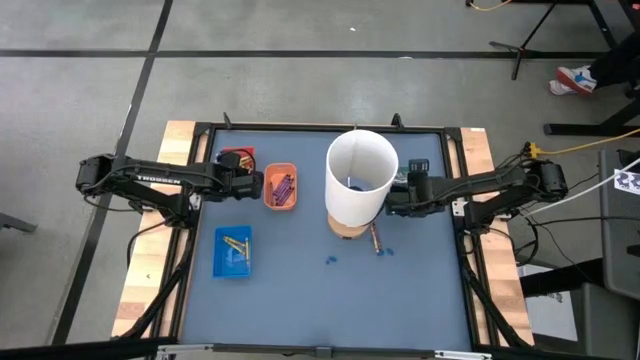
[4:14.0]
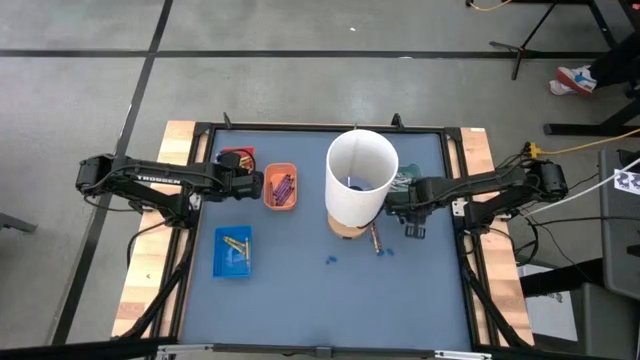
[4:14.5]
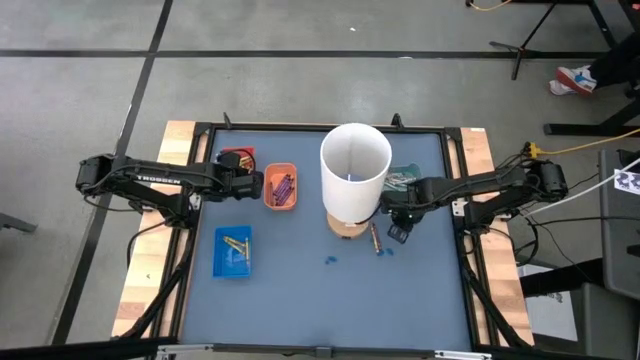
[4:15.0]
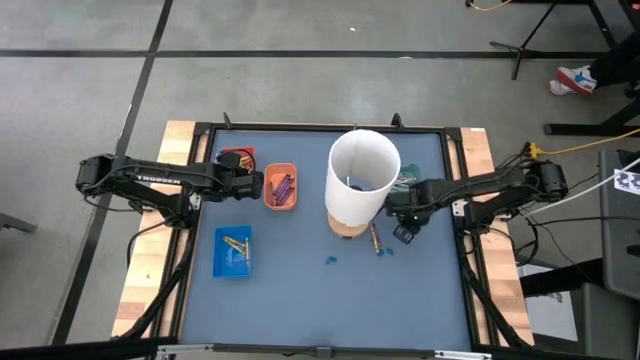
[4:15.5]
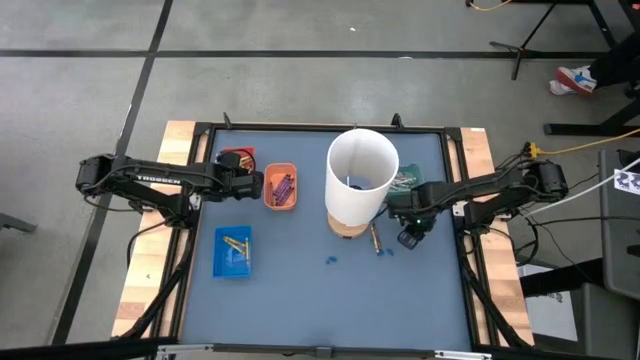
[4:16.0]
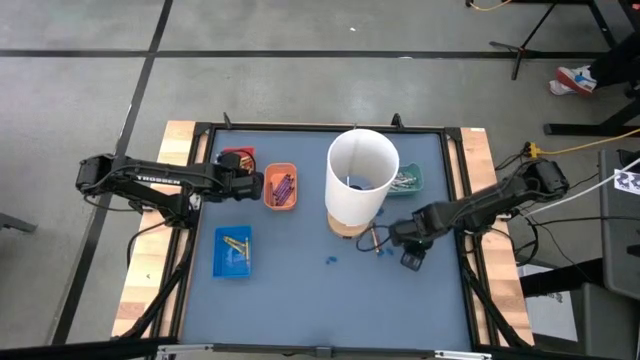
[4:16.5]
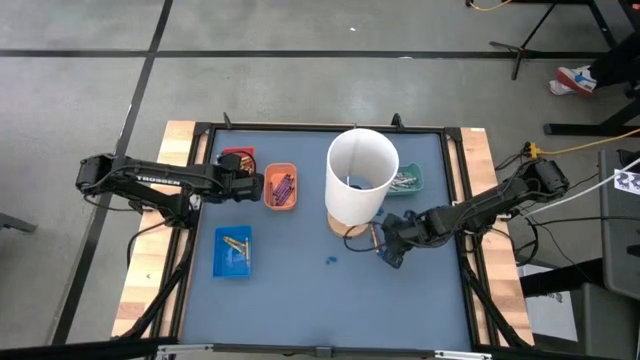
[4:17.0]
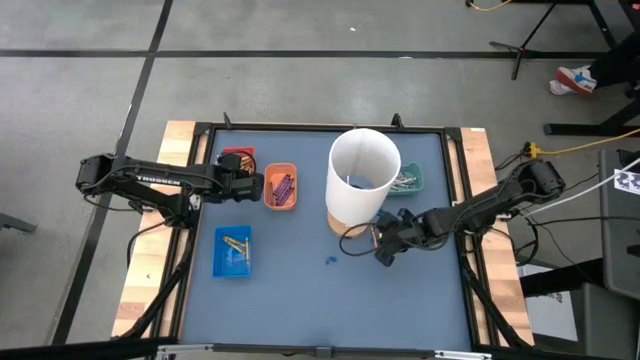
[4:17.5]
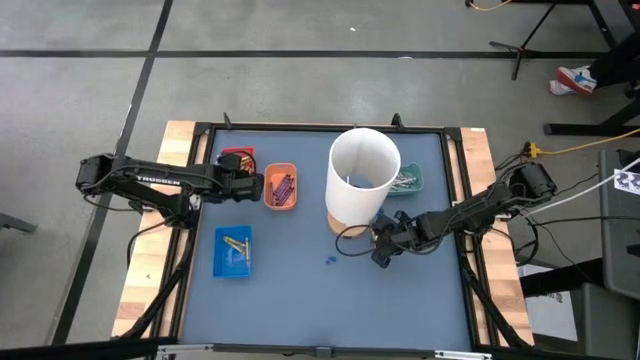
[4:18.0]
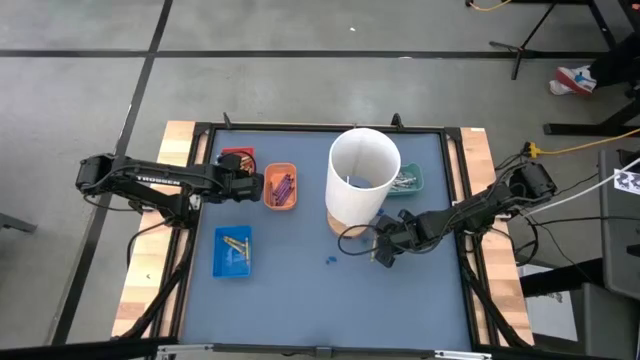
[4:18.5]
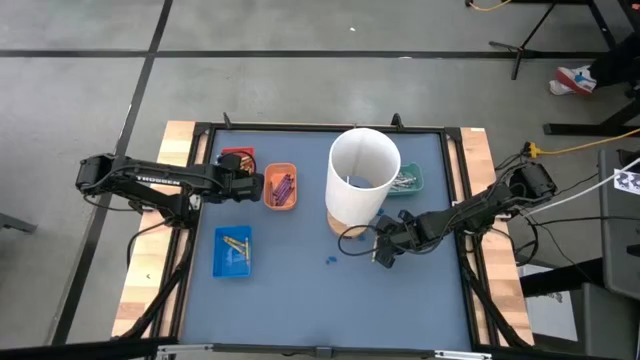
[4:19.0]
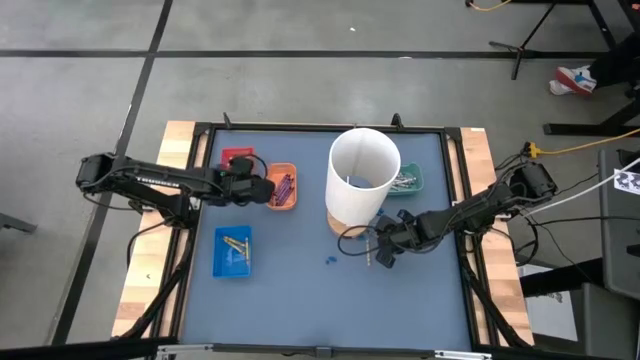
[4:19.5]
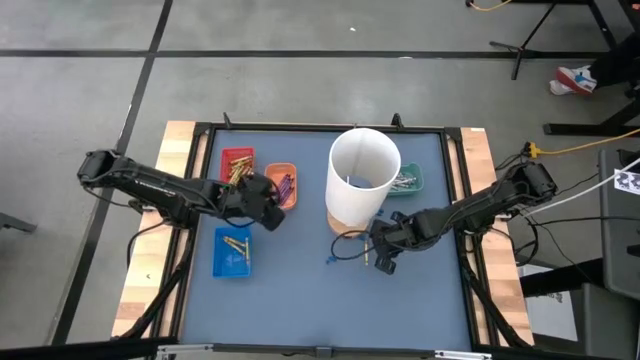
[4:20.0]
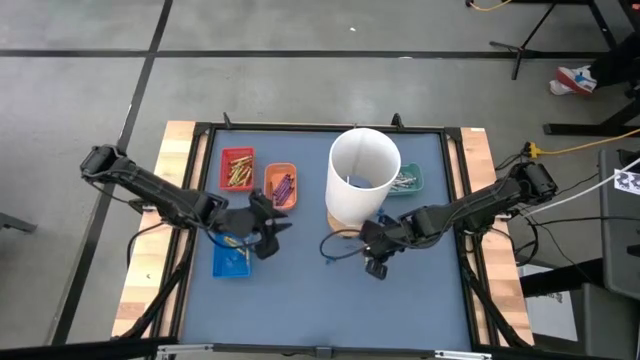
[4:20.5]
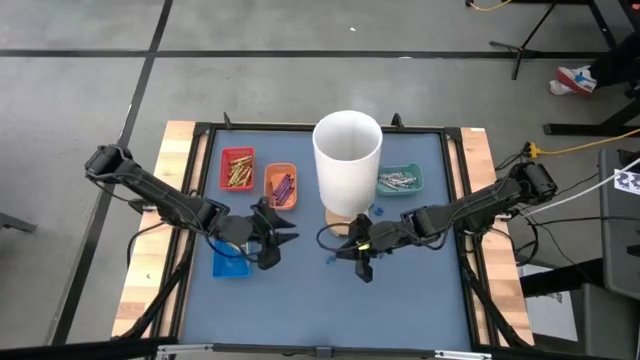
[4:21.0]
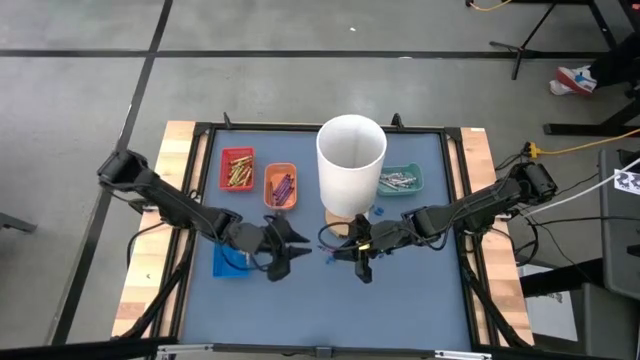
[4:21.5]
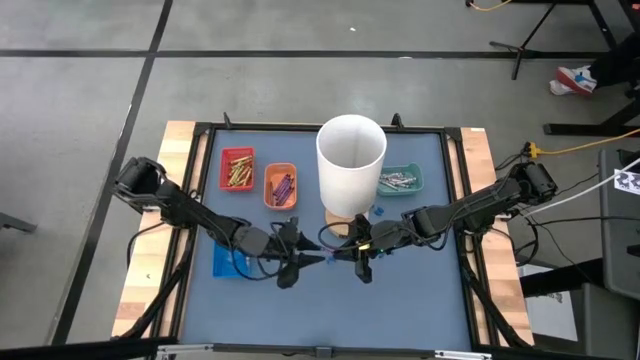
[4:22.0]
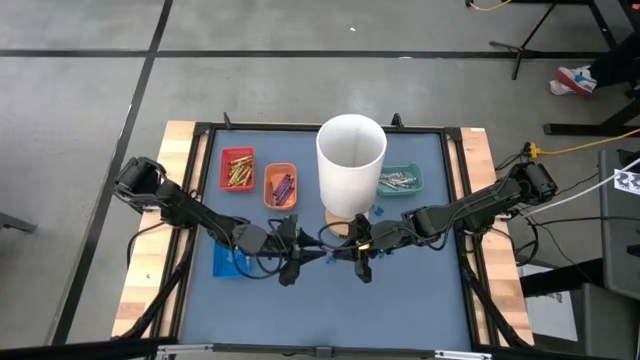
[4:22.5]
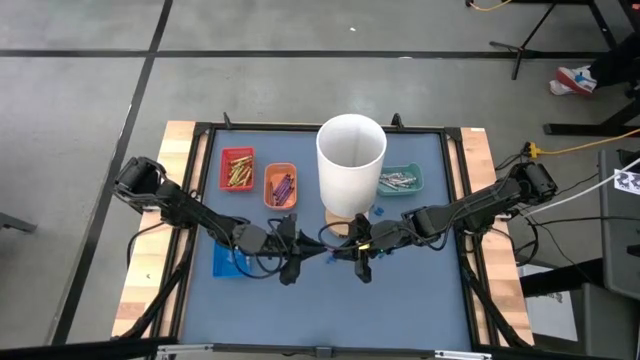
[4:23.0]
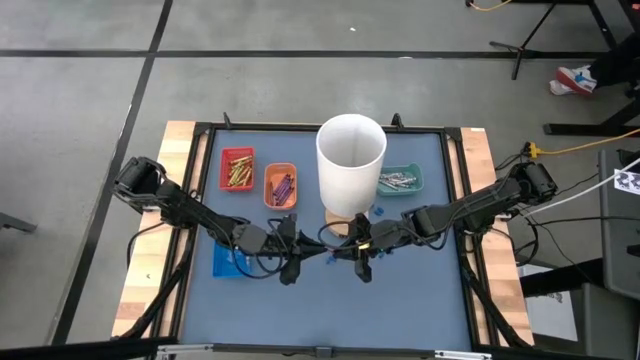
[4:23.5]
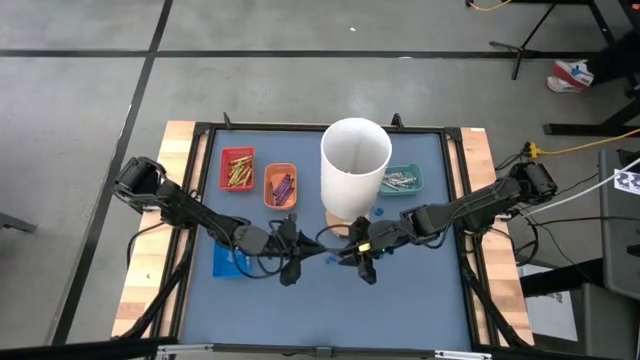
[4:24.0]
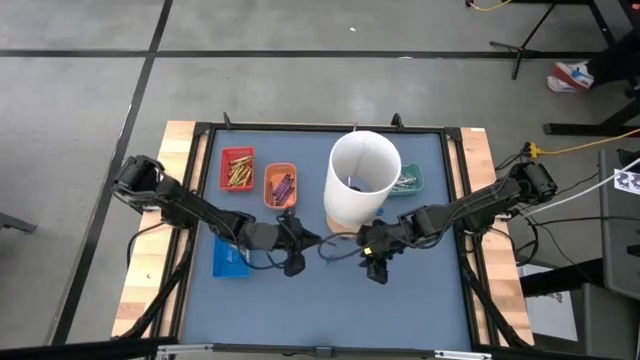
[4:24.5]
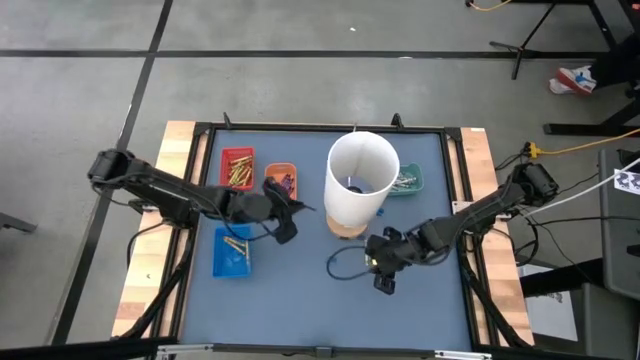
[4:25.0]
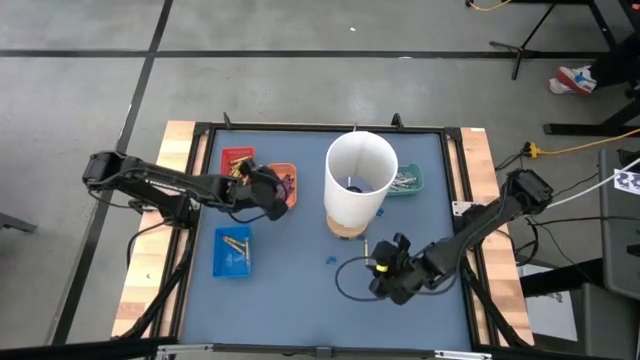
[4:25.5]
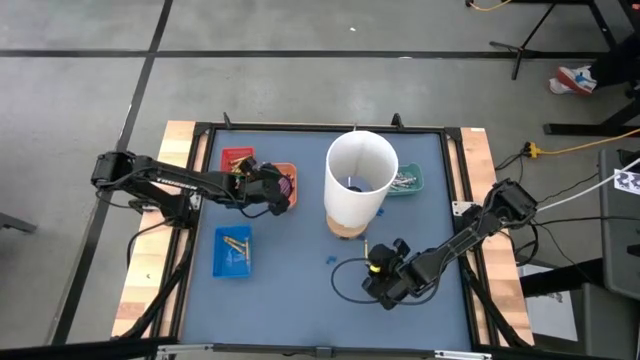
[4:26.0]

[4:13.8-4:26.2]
Task: Sort crayons
Put the violet crayon into the orange bin

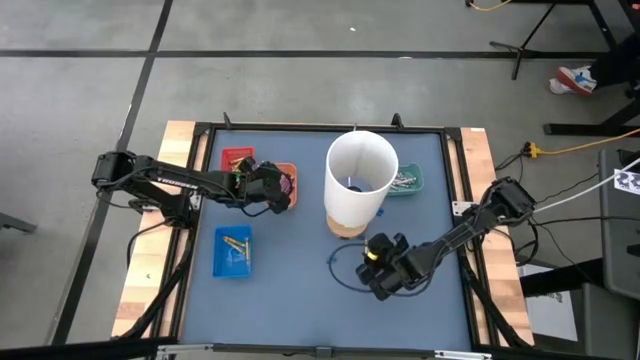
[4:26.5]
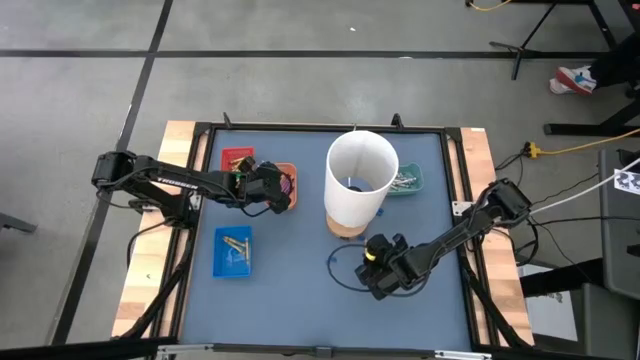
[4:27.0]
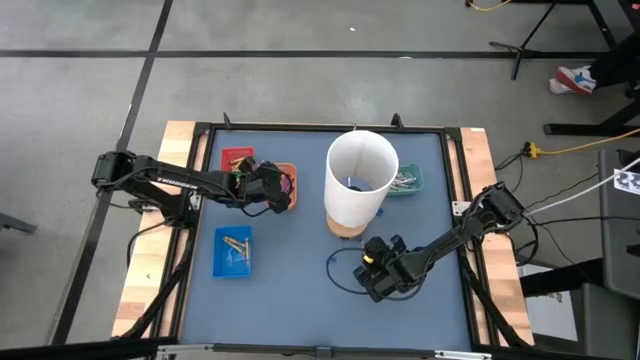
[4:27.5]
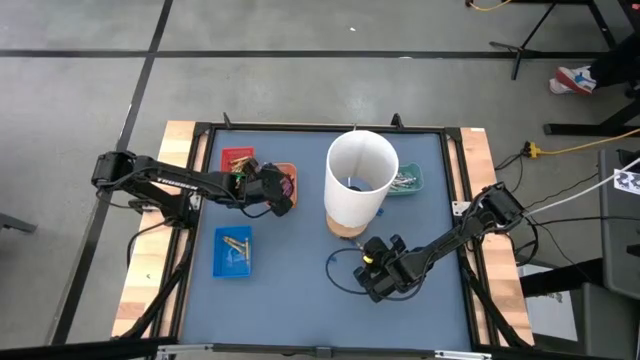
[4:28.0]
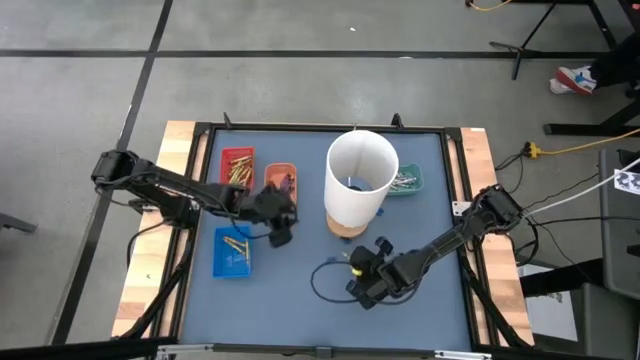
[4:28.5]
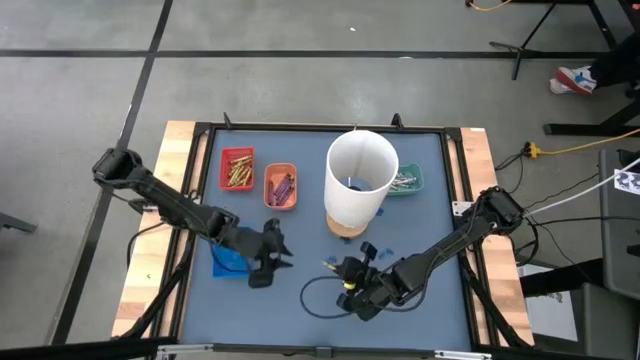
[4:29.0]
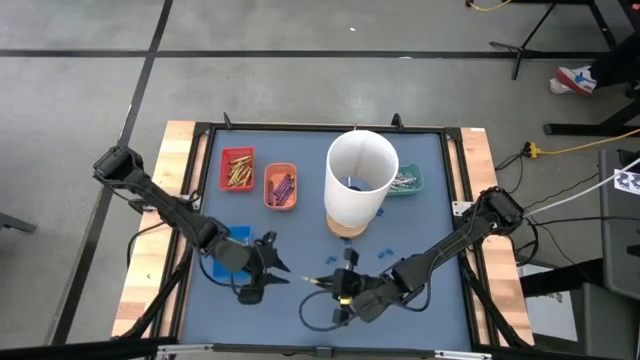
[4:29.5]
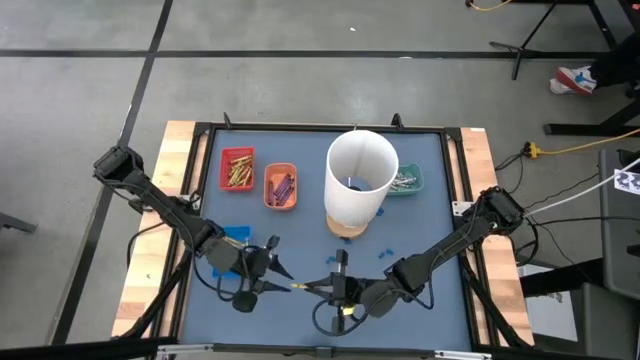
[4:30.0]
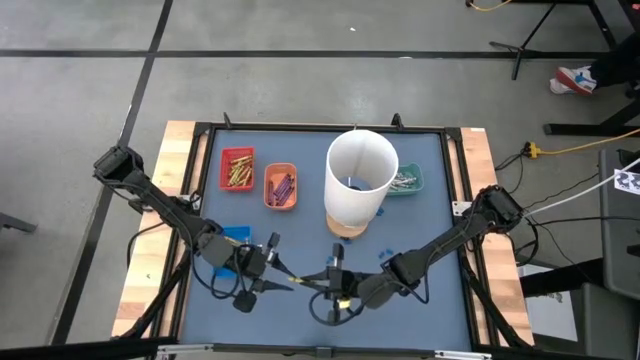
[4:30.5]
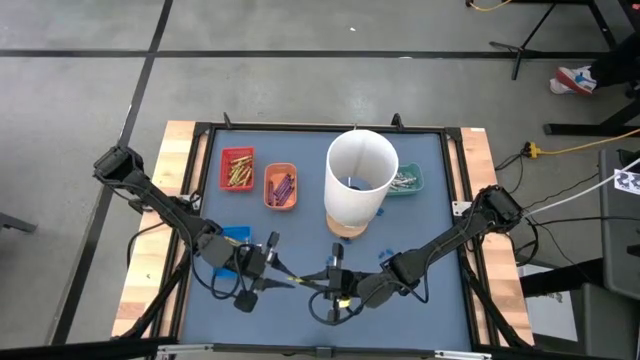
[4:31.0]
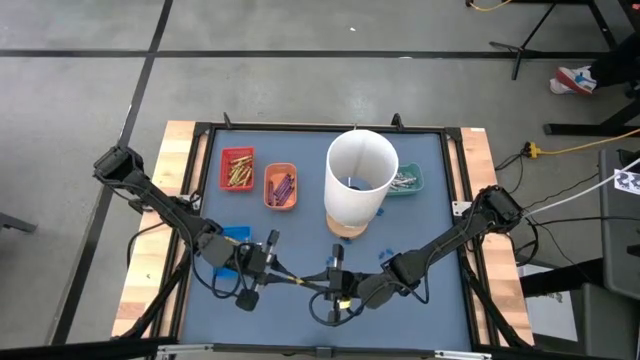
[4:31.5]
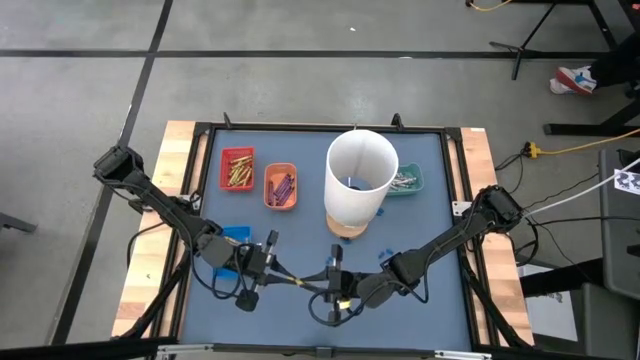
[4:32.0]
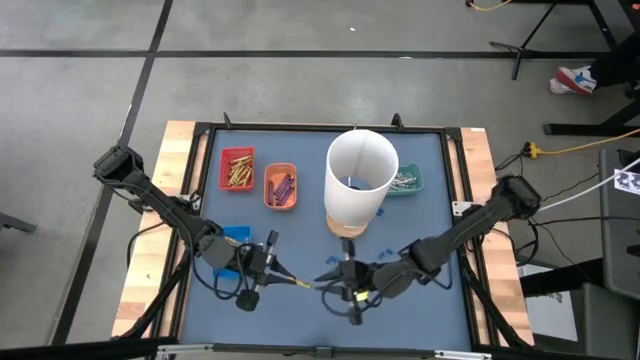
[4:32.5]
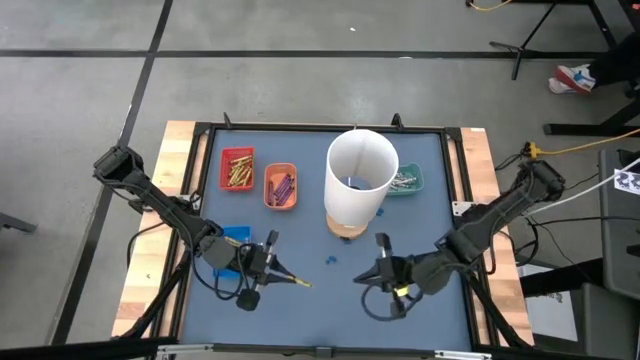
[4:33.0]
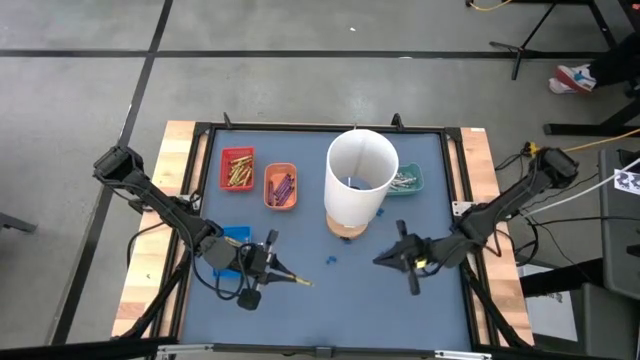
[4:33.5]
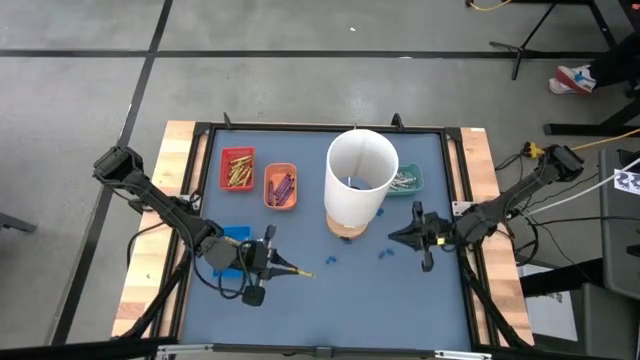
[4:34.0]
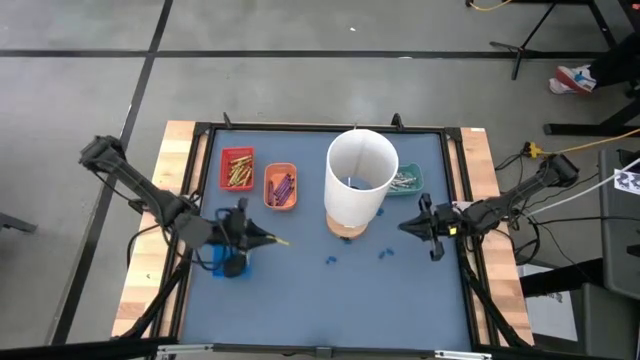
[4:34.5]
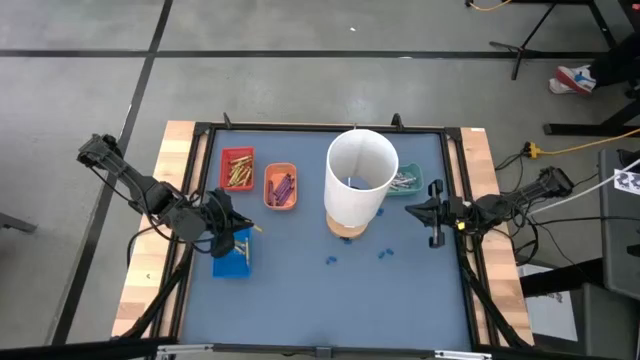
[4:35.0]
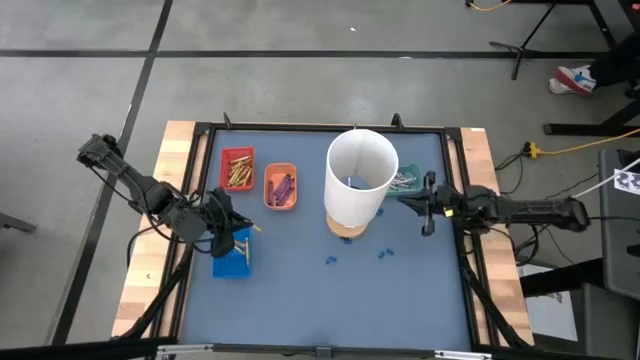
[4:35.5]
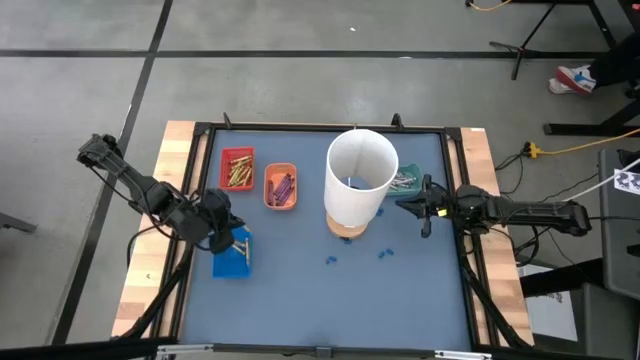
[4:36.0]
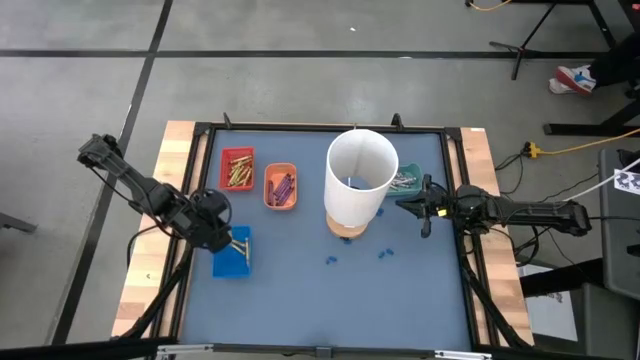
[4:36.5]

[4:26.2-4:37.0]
Put the yellow crayon into the blue bin
